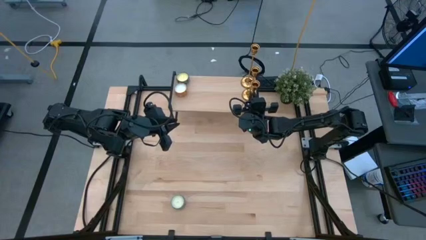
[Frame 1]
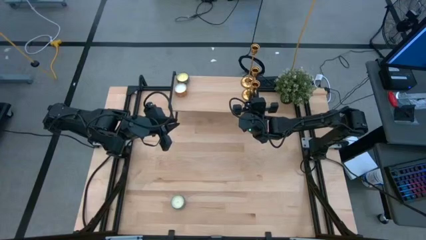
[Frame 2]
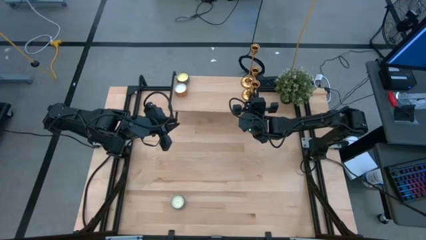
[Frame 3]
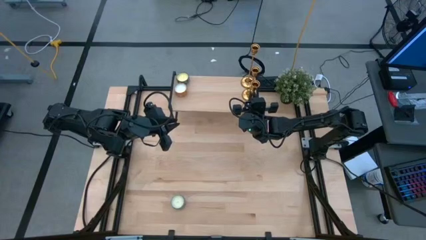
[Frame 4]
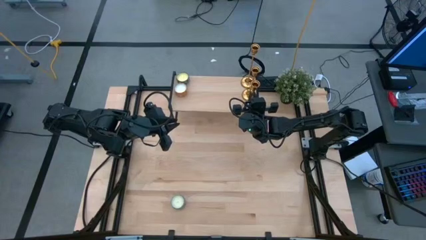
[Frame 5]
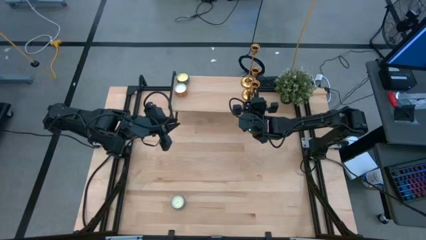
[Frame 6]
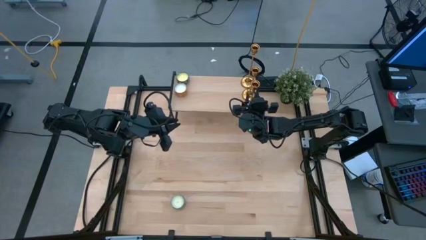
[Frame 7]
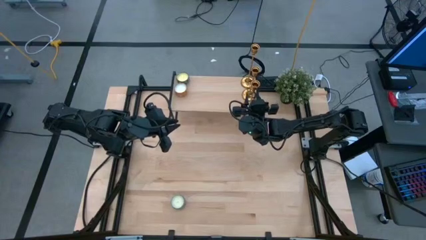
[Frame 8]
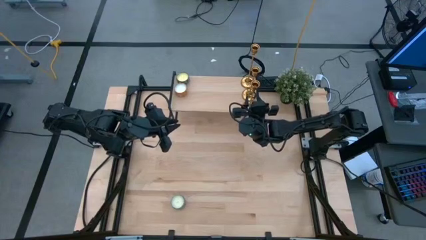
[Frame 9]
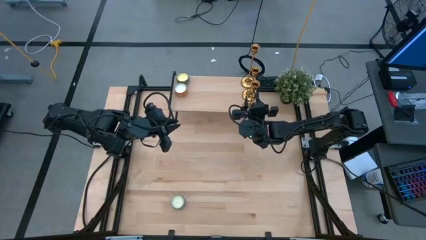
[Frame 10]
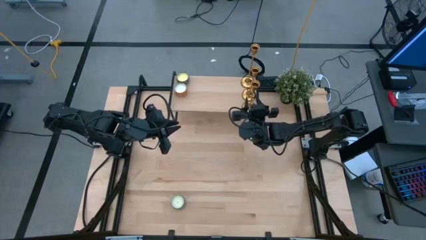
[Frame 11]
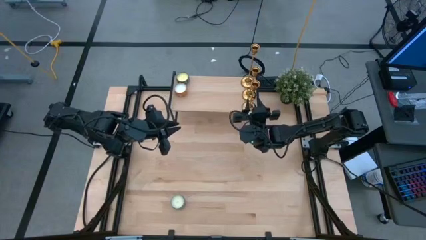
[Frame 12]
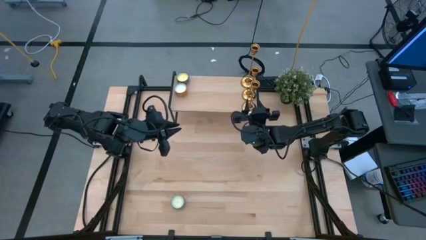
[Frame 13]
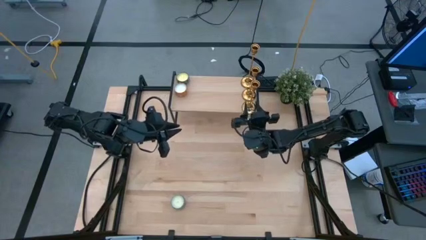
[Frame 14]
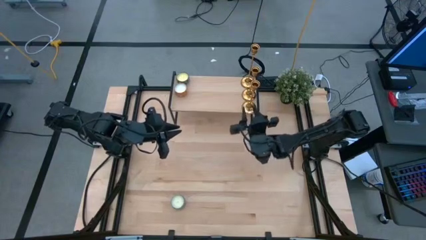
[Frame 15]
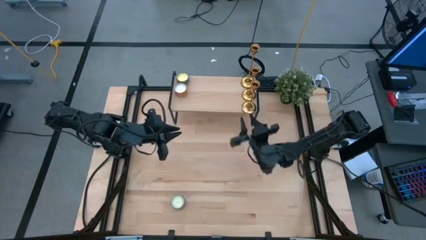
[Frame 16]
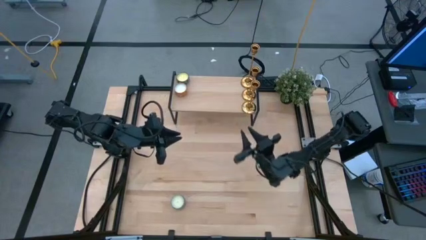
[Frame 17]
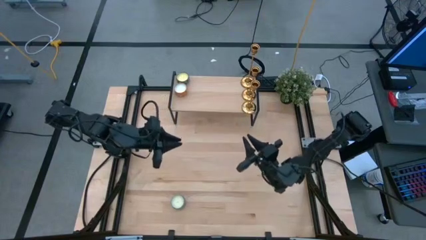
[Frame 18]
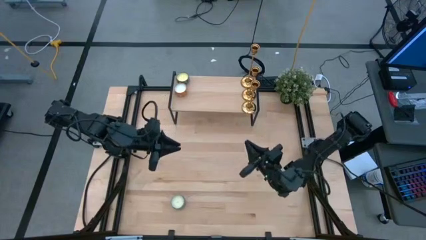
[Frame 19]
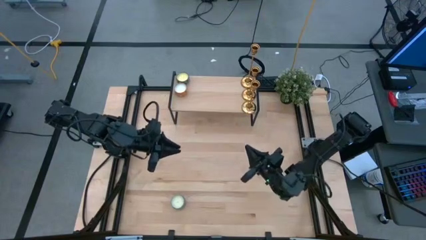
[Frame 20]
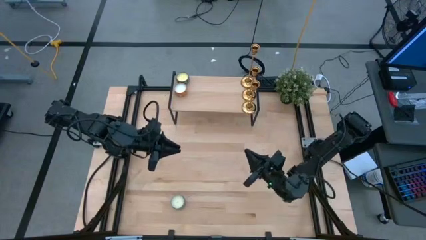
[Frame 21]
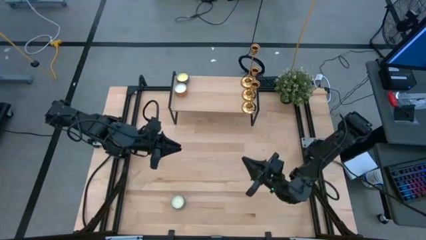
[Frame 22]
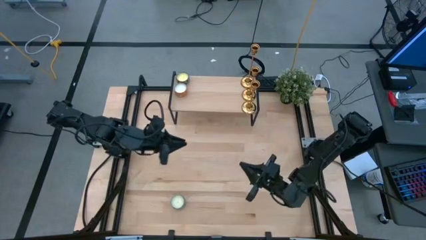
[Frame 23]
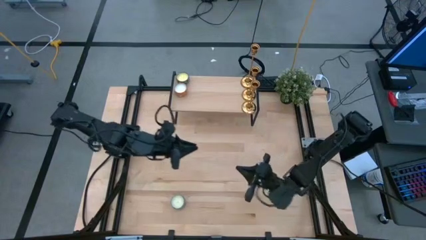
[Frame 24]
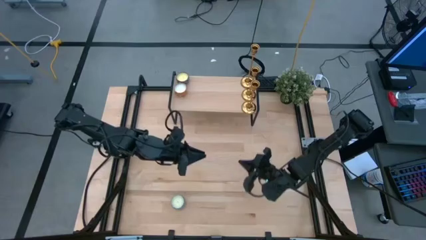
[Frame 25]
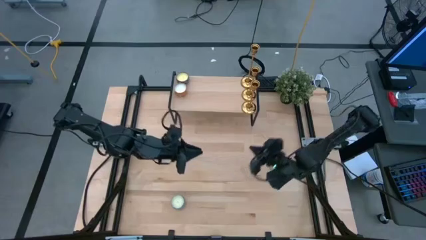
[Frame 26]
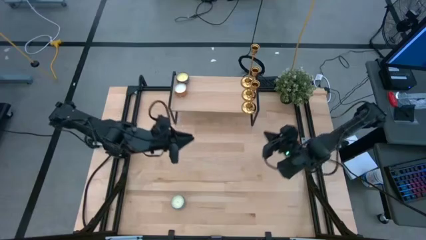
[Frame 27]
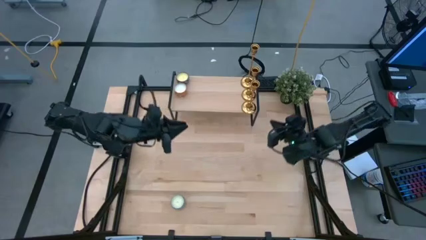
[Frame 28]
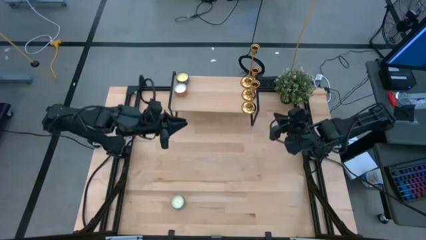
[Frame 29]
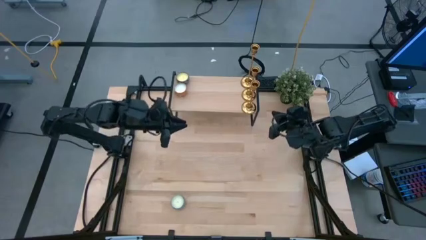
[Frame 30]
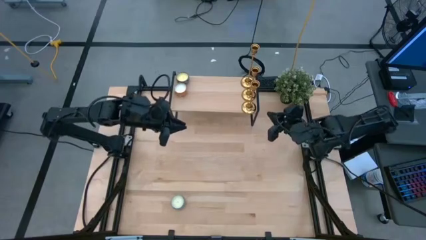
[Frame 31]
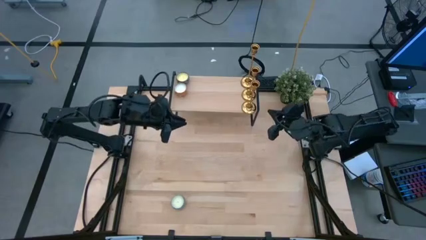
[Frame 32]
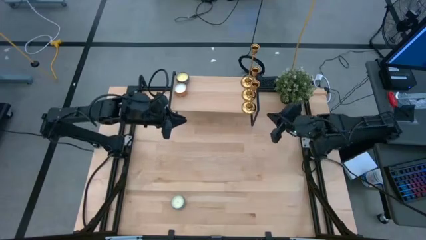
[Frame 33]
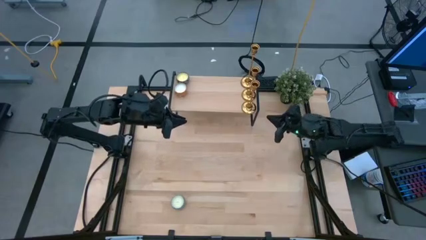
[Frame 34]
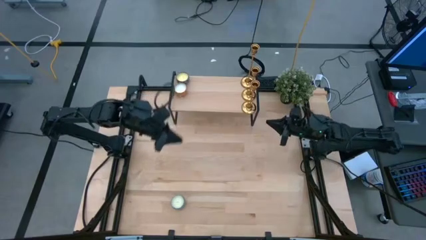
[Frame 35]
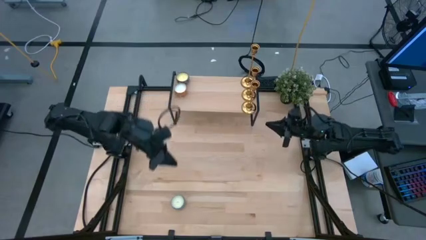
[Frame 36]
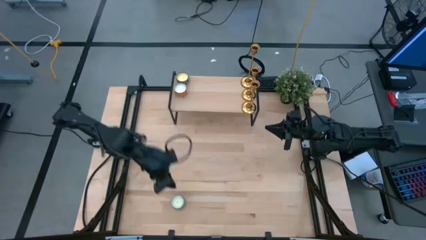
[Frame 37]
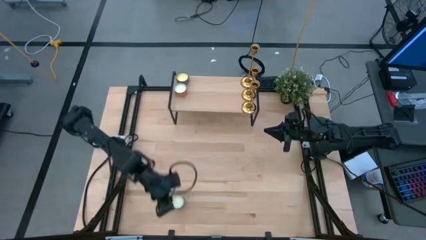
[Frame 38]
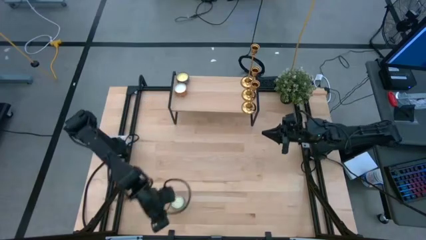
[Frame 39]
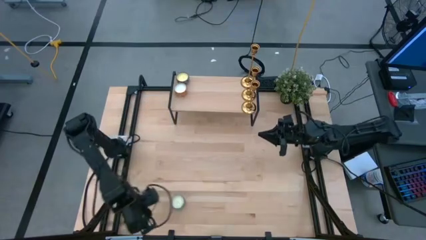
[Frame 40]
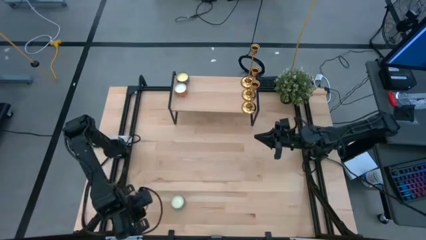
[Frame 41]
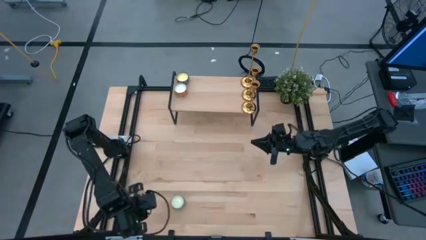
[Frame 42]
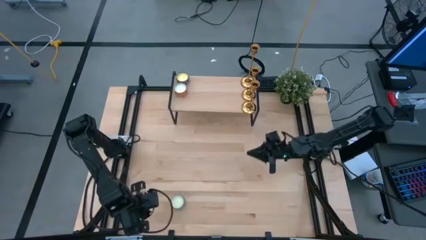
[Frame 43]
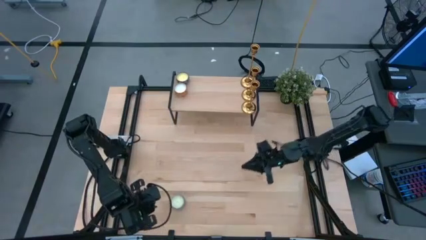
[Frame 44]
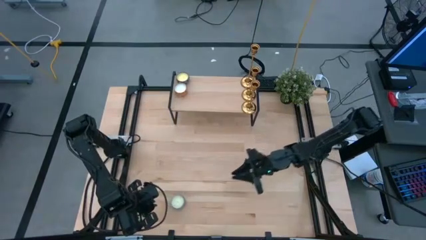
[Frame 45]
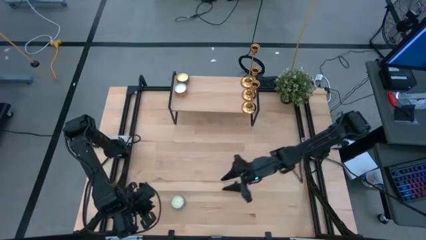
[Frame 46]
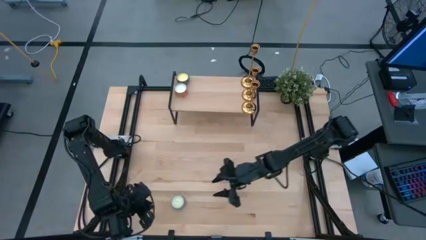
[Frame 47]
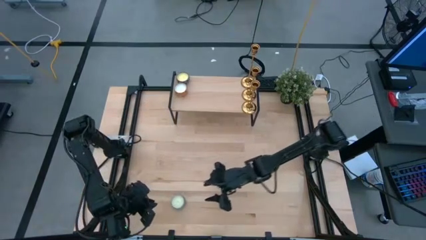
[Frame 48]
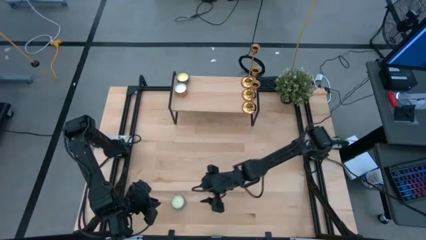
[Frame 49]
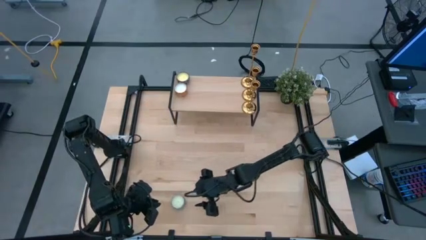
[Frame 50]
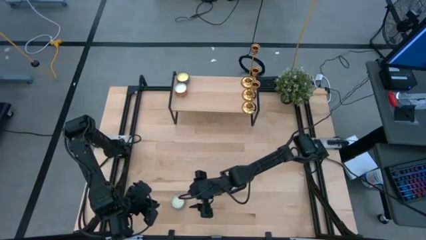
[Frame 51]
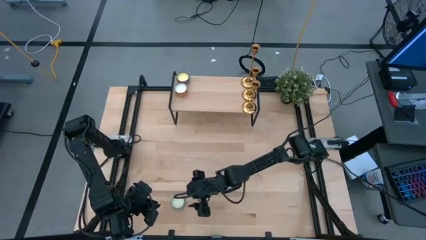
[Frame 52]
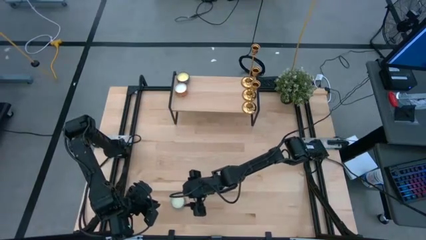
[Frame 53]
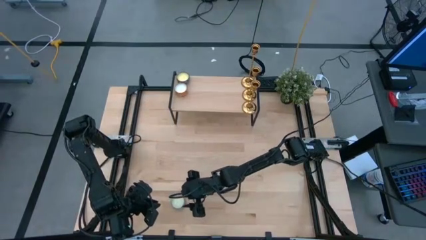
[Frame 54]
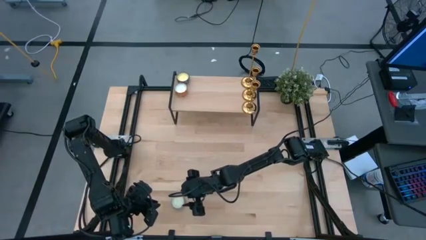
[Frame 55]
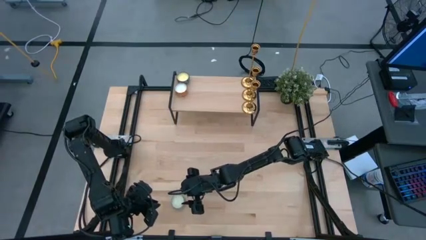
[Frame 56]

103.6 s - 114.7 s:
Task: Pick & Place candle stick holders
Put the white patterned scented candle on the shelf aligned with the yellow patterned scented candle

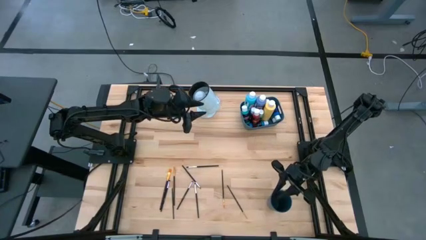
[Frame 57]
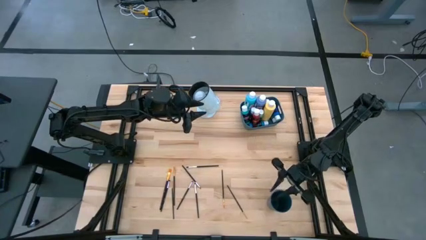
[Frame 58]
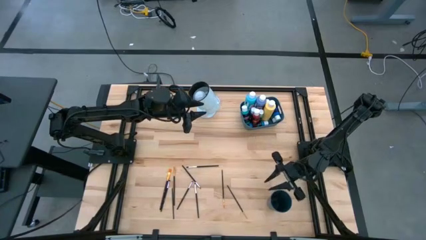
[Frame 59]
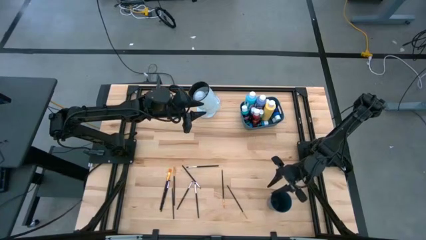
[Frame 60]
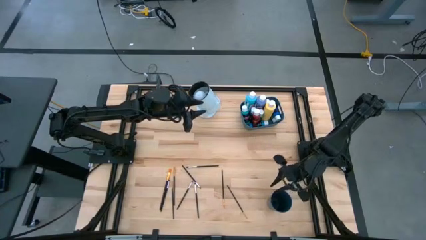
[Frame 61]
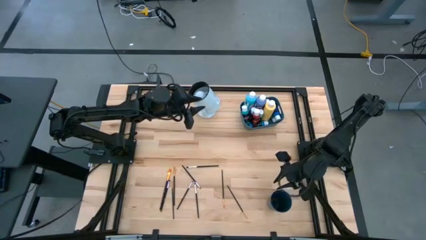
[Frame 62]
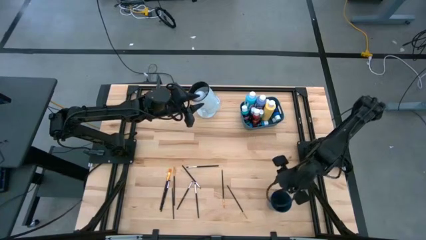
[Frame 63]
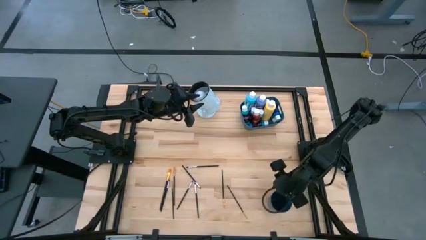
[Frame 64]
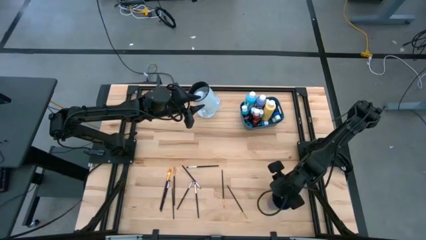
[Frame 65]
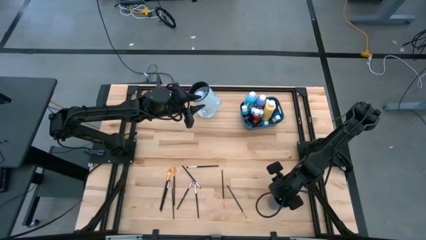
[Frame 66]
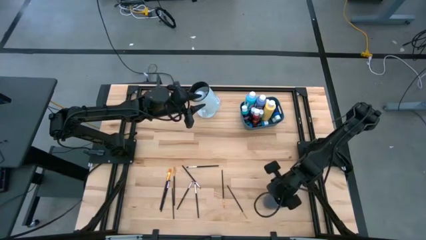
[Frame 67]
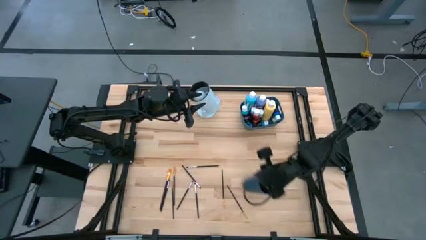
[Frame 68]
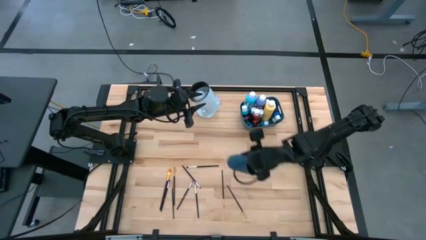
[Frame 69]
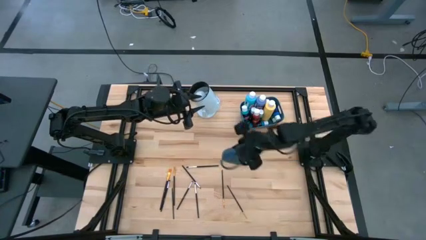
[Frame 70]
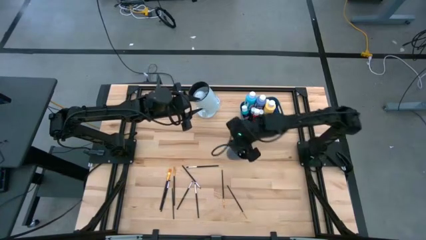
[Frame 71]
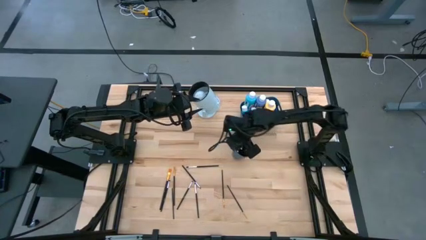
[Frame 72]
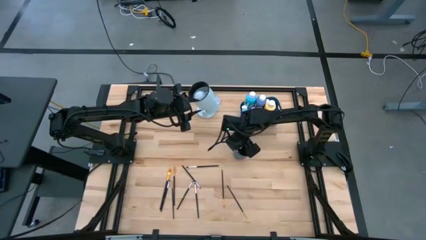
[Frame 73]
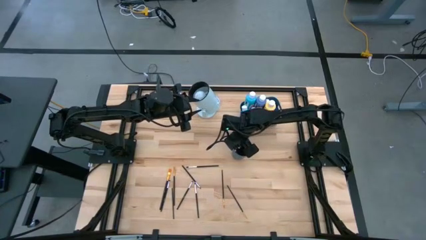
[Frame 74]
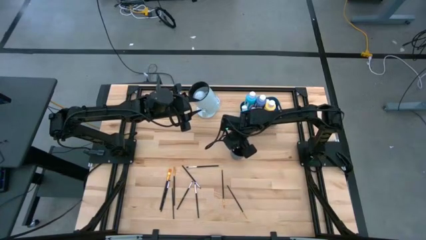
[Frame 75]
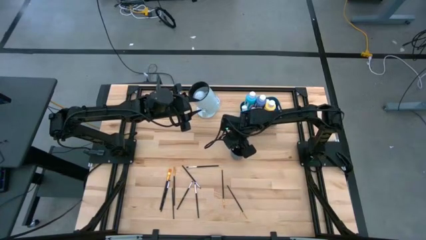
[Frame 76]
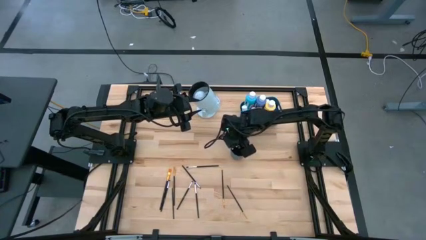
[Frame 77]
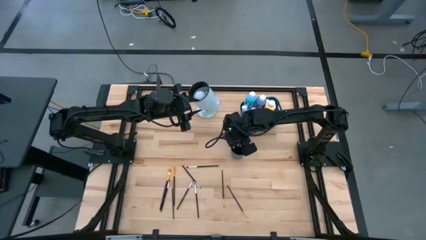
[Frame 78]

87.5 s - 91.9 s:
Task: Pick & Place Paint Supplies
Move the blue cup to the center of the table
